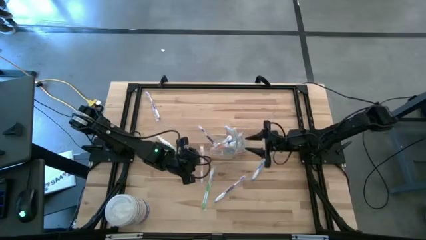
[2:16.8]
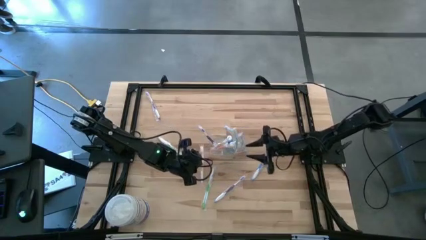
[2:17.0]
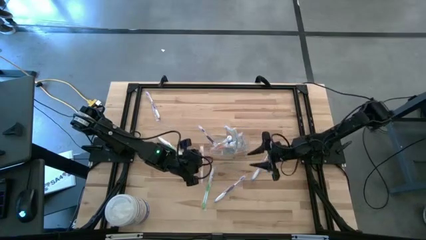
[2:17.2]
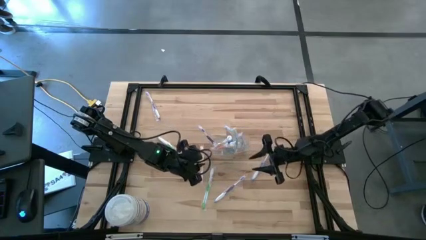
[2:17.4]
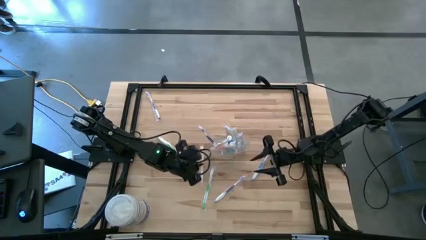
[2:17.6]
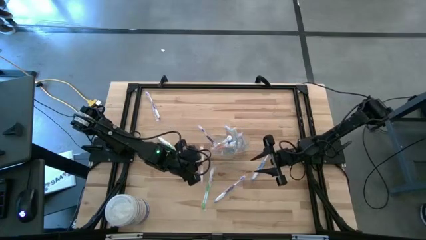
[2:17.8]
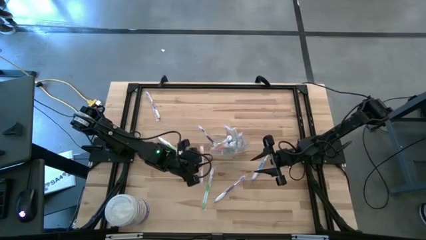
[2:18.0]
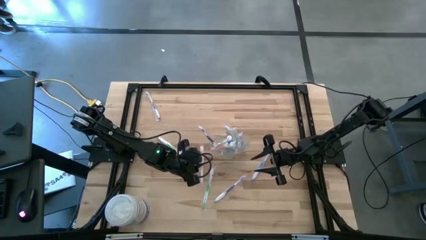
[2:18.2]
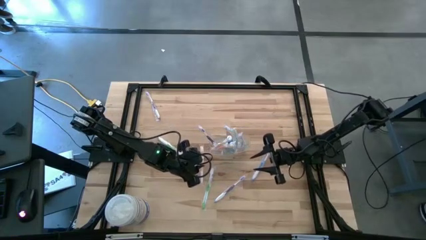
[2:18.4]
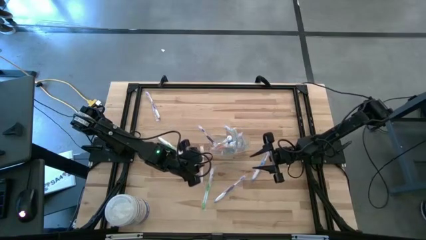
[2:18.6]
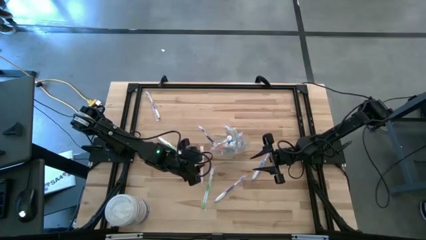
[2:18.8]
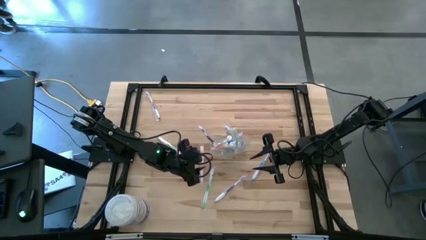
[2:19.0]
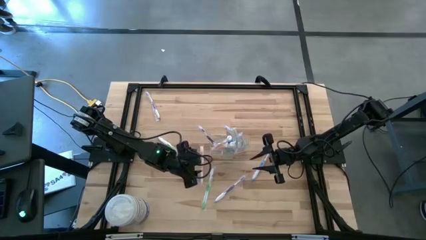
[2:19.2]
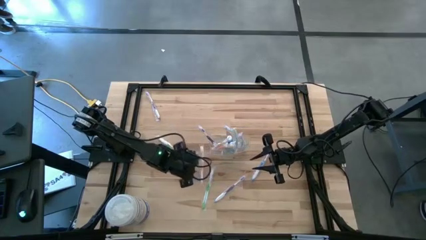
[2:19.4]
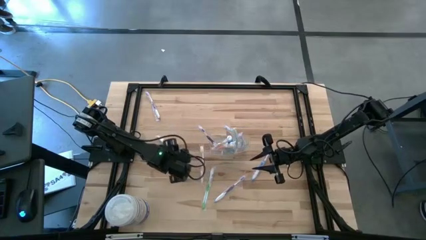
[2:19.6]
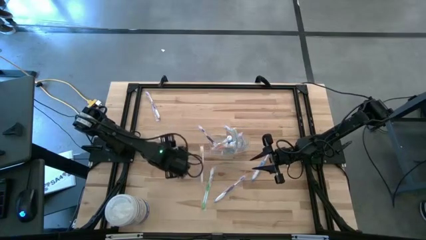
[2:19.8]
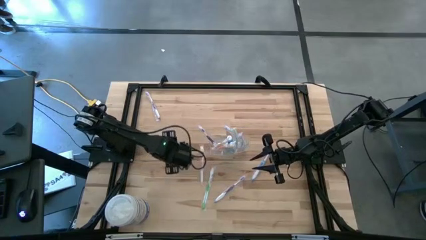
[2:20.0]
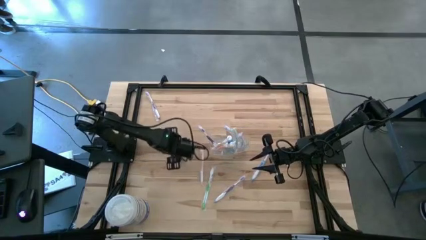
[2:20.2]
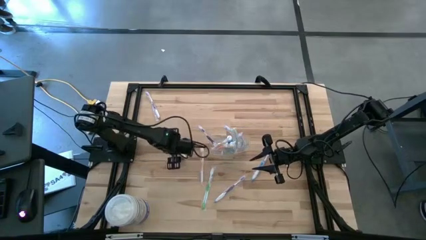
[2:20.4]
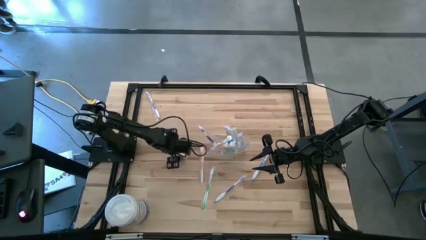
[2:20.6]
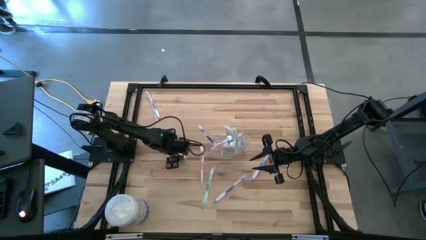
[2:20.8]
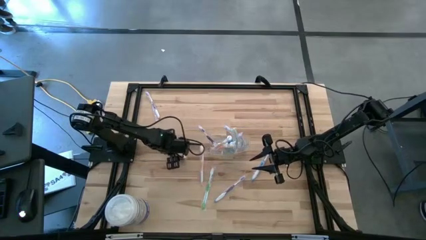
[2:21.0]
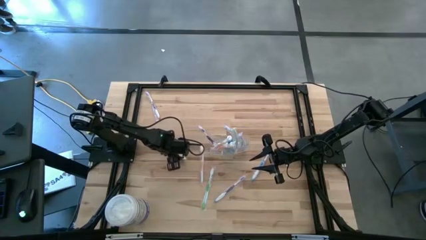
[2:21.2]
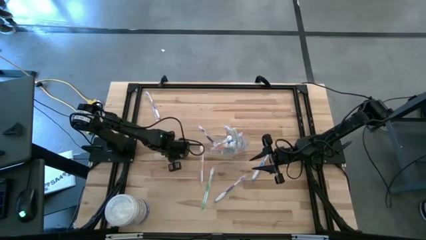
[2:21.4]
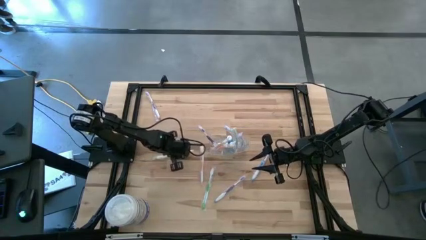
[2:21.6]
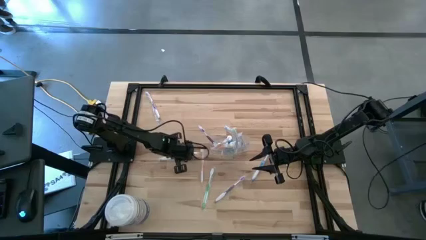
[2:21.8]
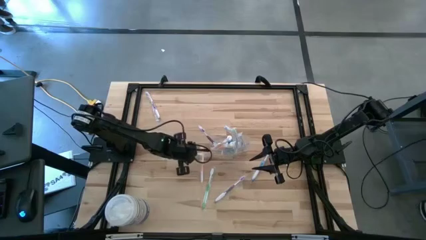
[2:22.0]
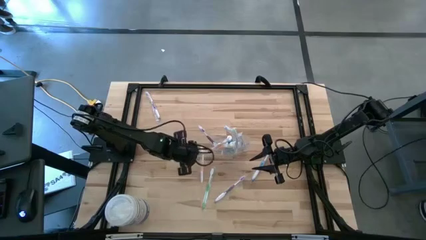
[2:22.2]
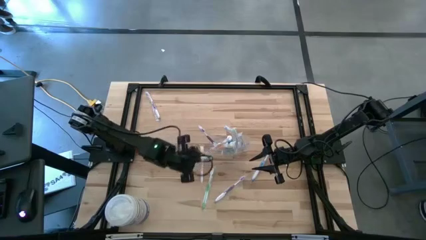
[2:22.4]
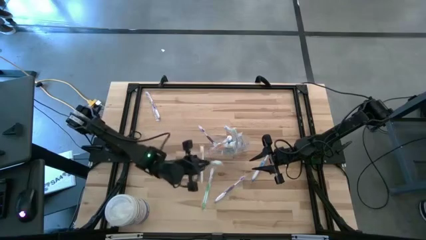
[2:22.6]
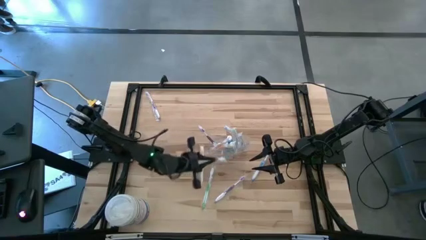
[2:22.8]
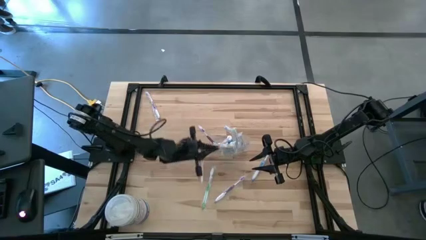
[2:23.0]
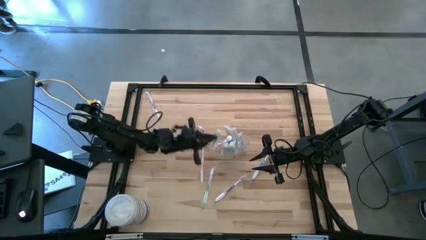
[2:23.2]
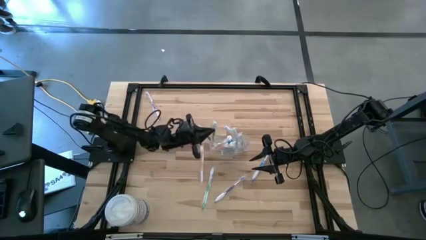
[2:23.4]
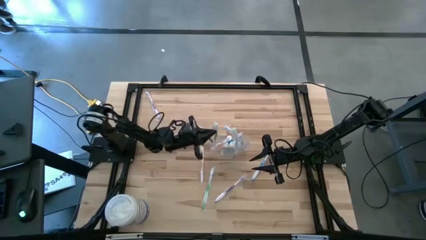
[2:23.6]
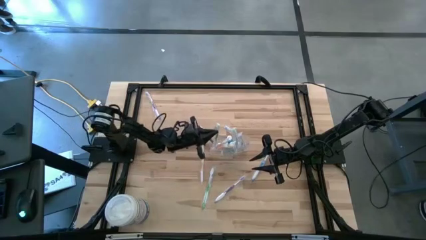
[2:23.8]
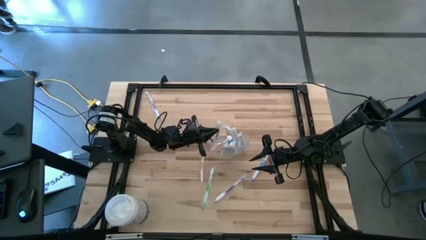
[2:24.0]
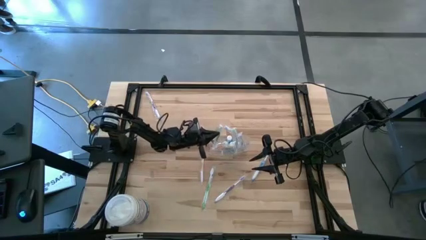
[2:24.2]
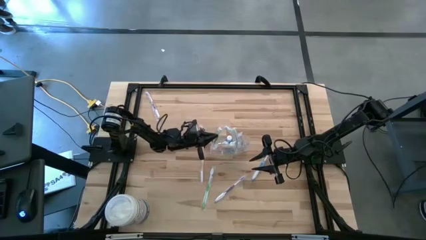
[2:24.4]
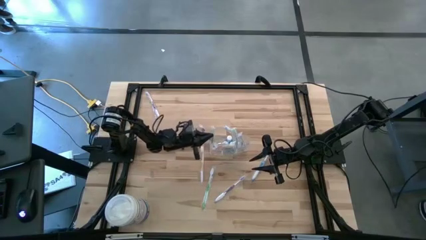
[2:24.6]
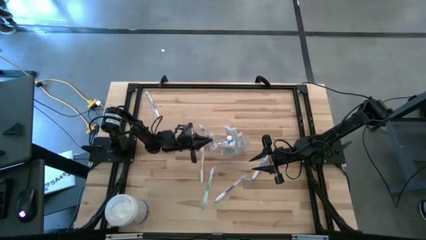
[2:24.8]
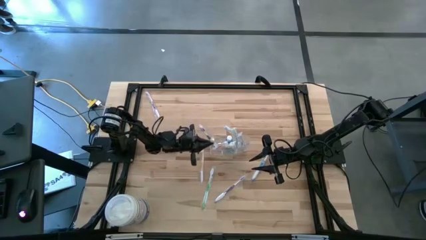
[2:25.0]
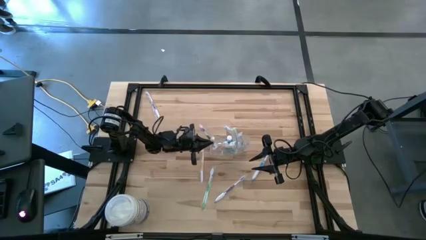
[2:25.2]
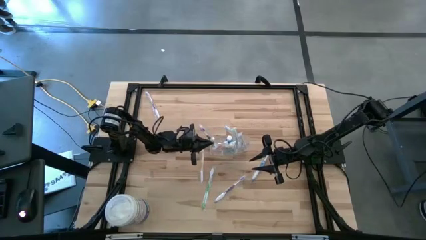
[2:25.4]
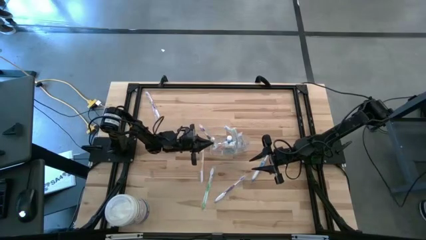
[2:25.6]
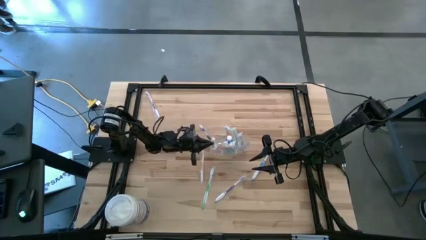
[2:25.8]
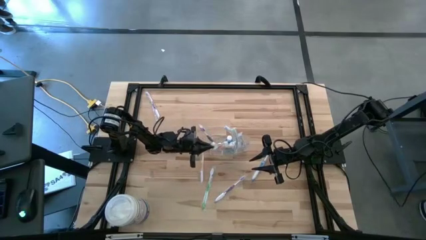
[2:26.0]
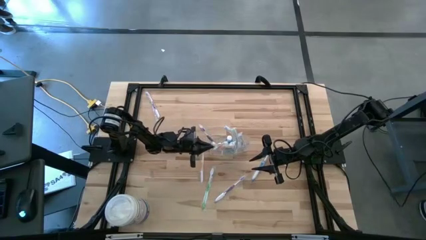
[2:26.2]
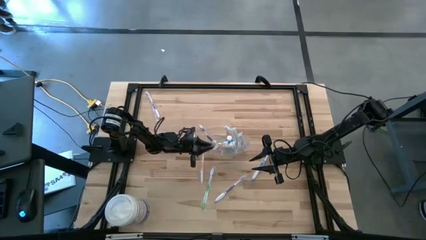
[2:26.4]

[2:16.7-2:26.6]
Task: Pick & Place toothbrushing station
Put the top green toothbrush into the wire organizer
